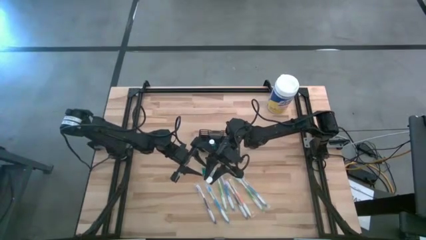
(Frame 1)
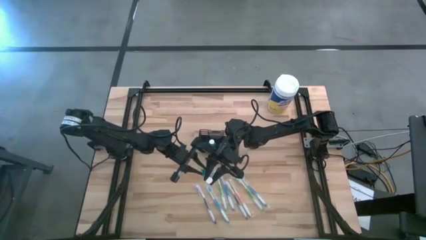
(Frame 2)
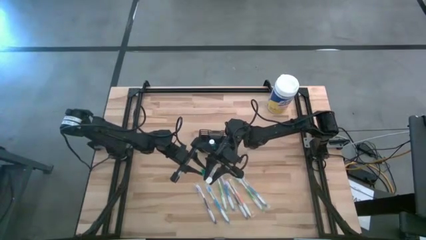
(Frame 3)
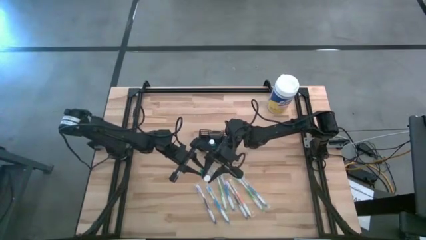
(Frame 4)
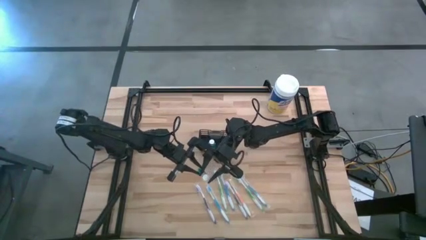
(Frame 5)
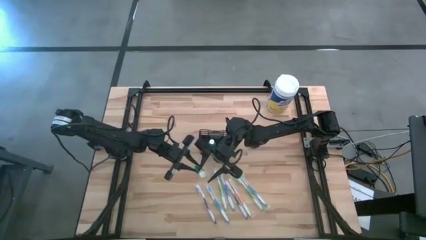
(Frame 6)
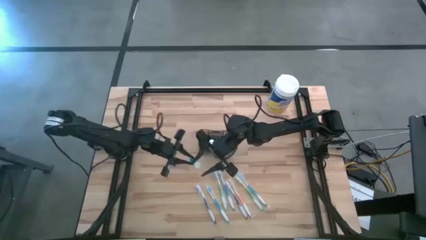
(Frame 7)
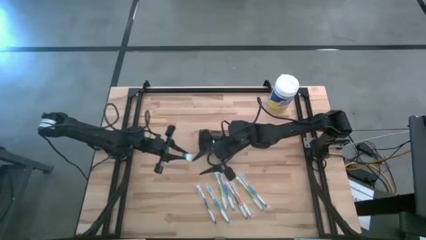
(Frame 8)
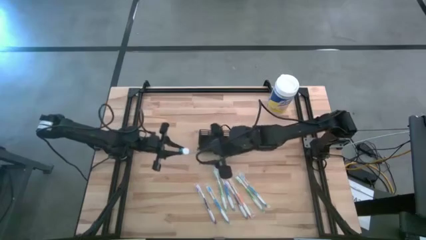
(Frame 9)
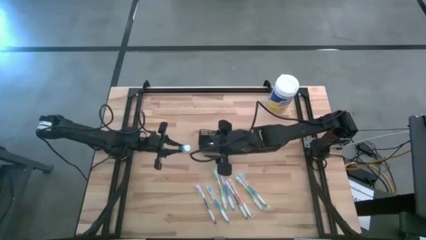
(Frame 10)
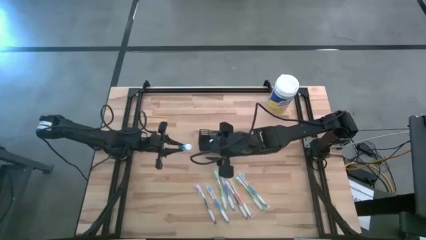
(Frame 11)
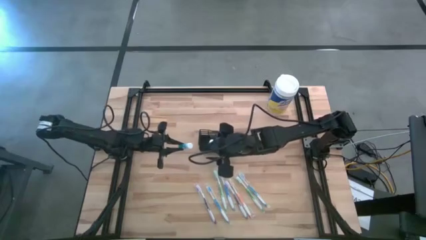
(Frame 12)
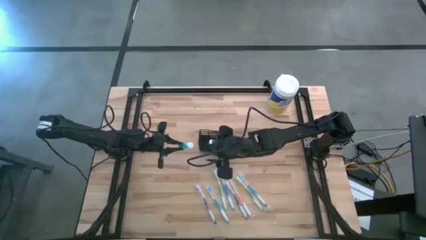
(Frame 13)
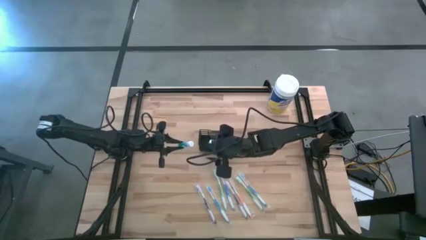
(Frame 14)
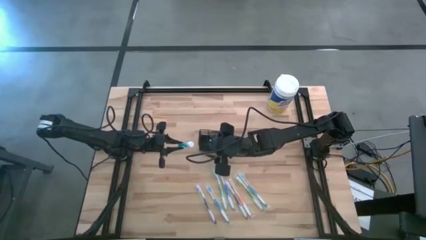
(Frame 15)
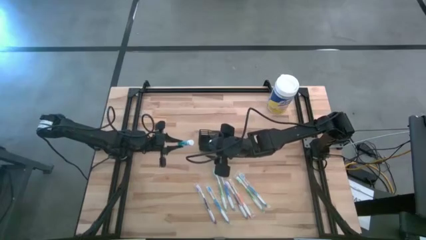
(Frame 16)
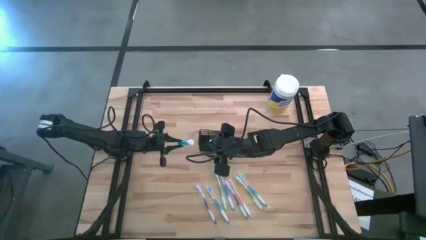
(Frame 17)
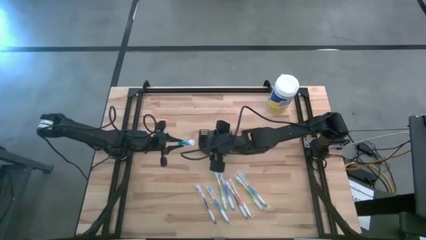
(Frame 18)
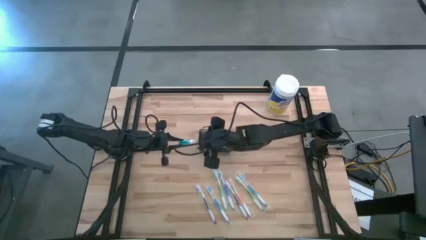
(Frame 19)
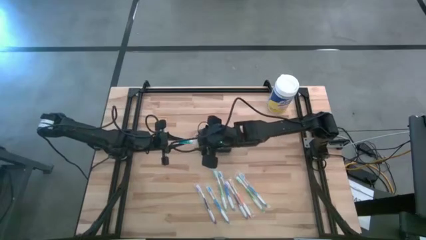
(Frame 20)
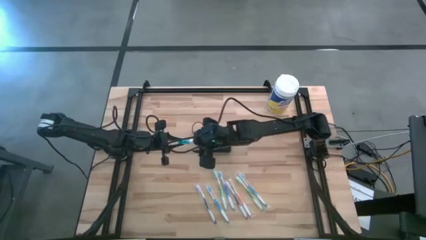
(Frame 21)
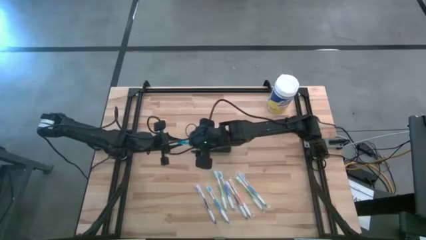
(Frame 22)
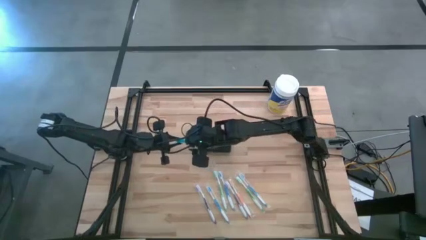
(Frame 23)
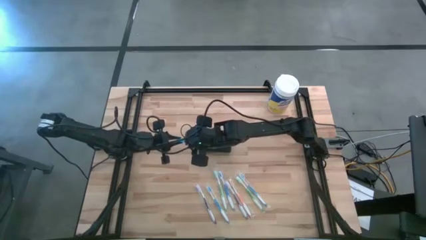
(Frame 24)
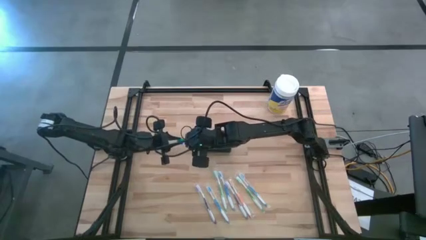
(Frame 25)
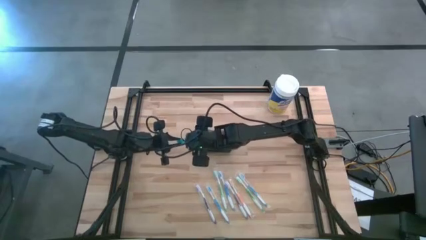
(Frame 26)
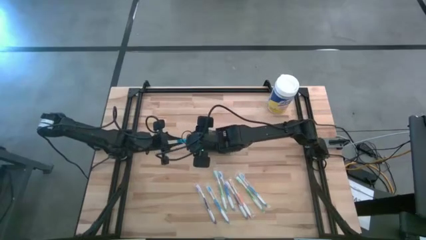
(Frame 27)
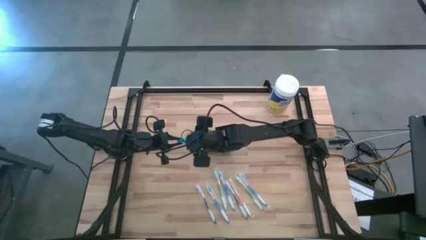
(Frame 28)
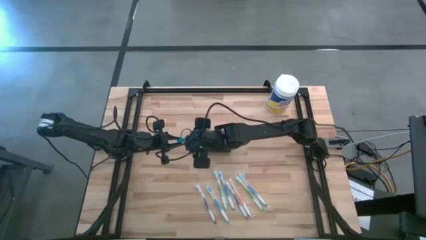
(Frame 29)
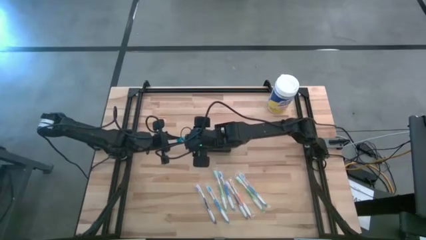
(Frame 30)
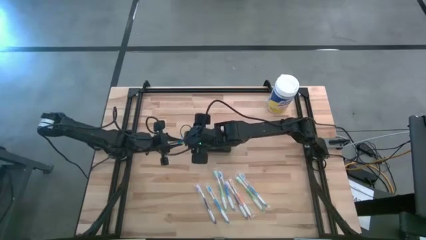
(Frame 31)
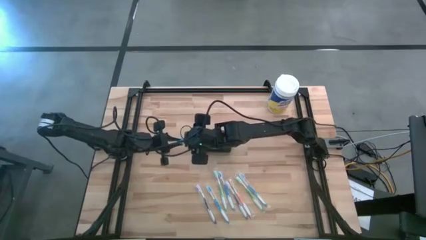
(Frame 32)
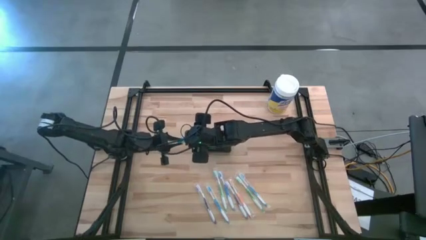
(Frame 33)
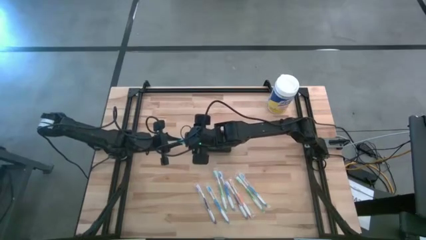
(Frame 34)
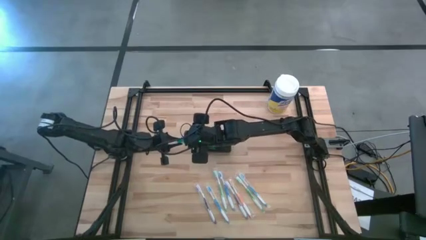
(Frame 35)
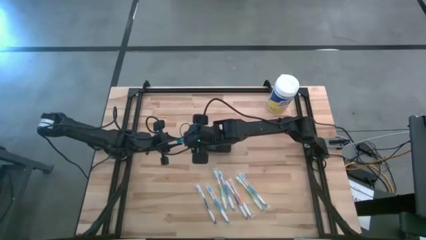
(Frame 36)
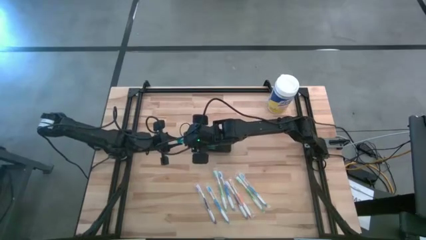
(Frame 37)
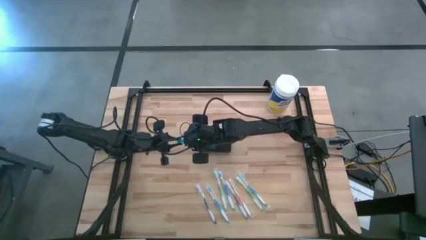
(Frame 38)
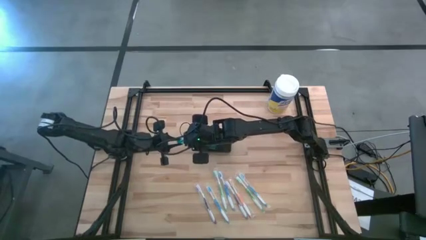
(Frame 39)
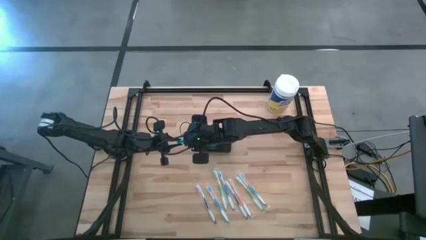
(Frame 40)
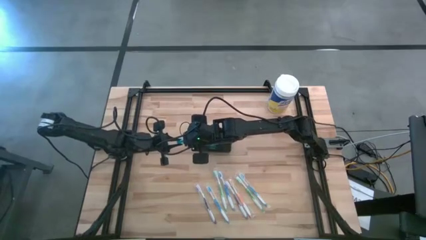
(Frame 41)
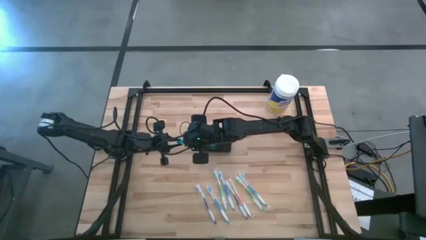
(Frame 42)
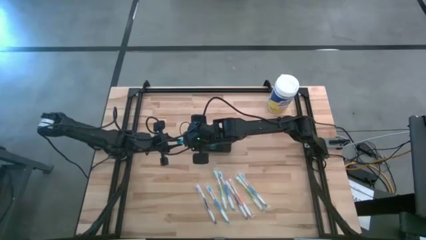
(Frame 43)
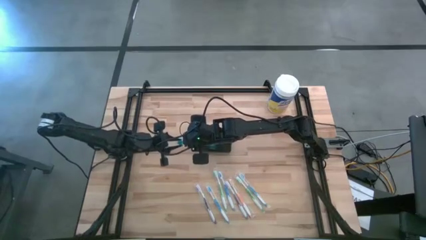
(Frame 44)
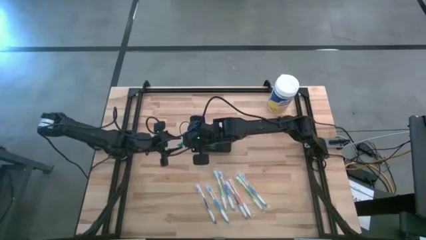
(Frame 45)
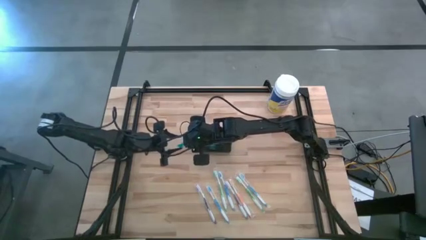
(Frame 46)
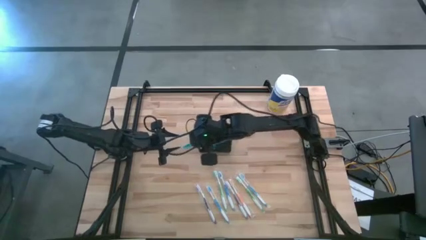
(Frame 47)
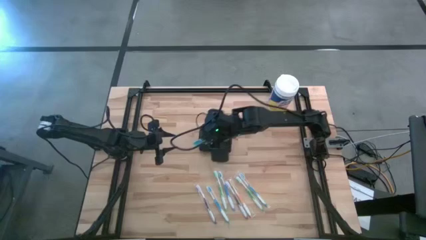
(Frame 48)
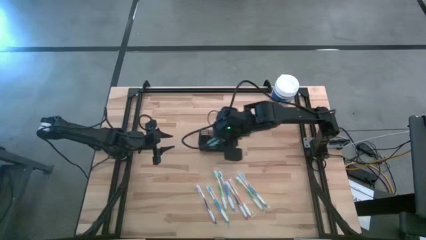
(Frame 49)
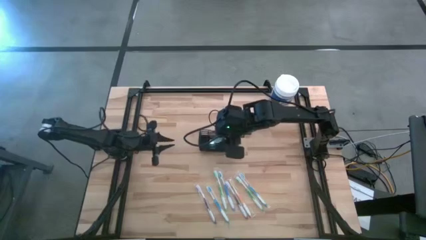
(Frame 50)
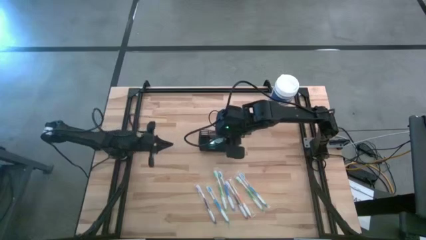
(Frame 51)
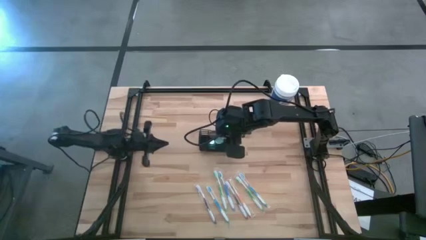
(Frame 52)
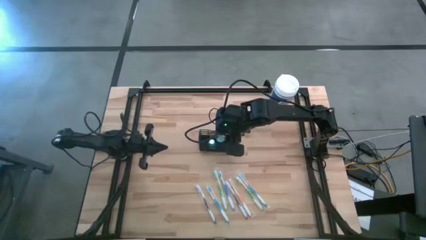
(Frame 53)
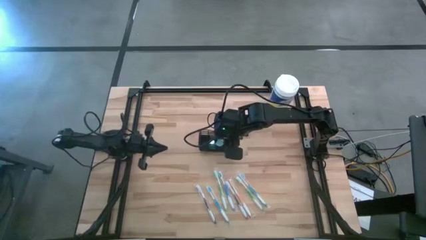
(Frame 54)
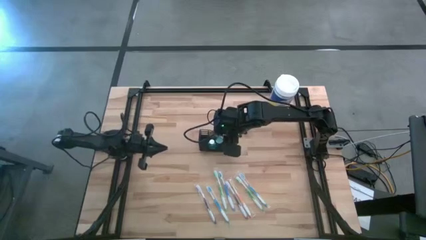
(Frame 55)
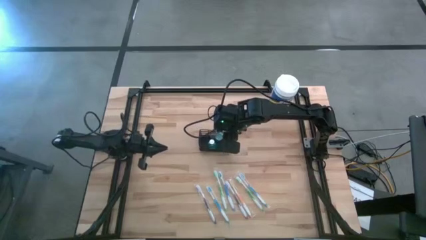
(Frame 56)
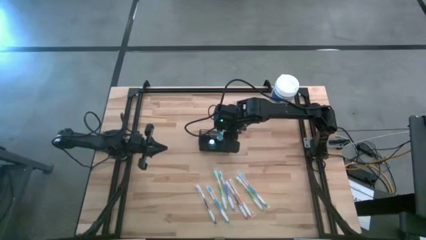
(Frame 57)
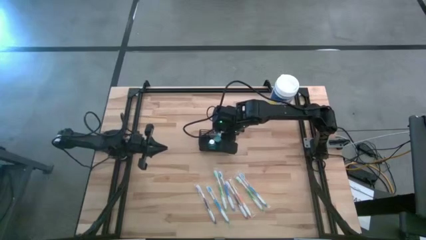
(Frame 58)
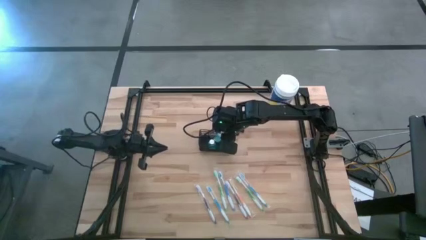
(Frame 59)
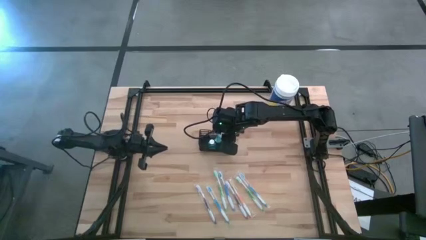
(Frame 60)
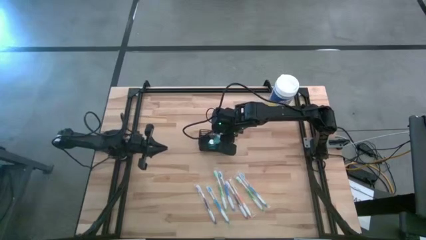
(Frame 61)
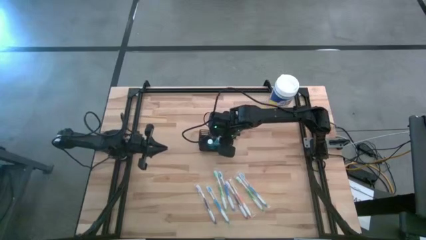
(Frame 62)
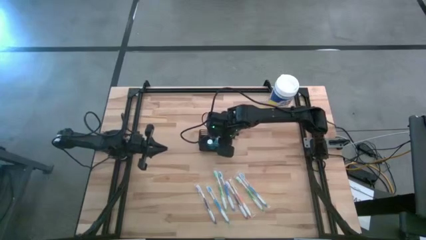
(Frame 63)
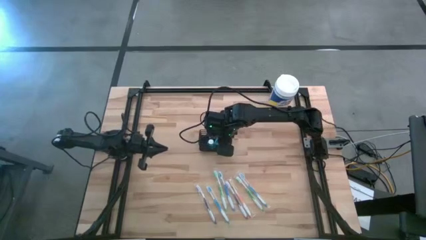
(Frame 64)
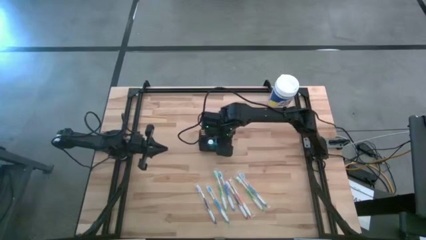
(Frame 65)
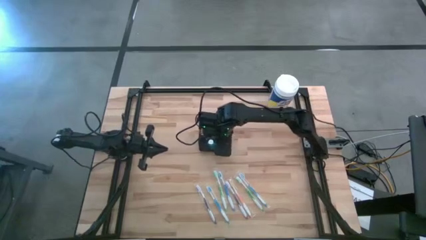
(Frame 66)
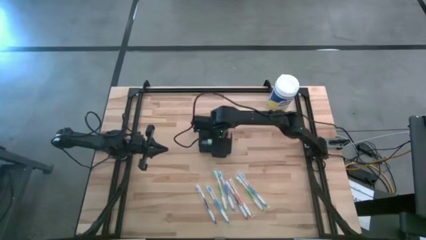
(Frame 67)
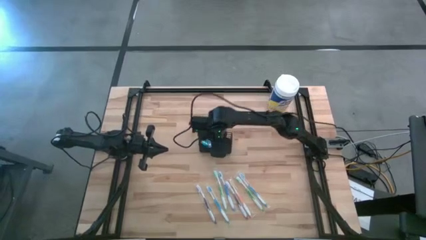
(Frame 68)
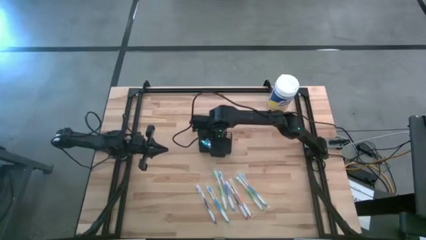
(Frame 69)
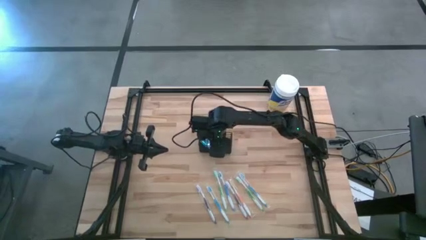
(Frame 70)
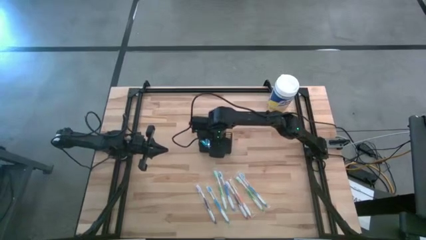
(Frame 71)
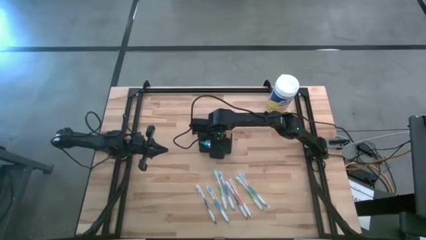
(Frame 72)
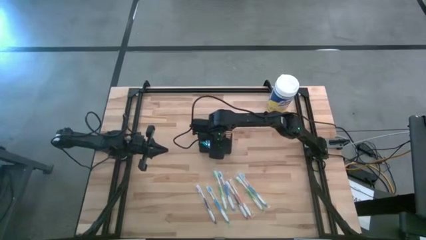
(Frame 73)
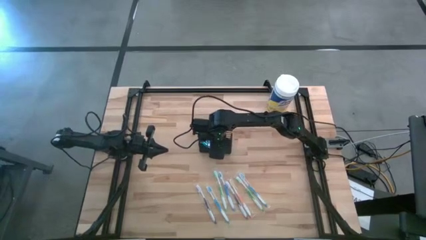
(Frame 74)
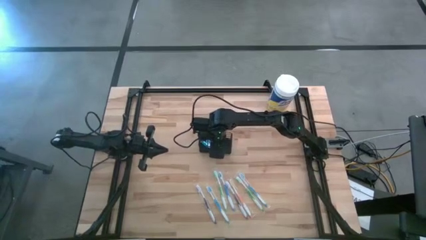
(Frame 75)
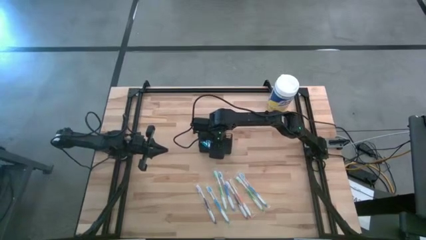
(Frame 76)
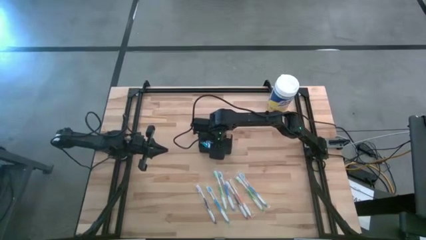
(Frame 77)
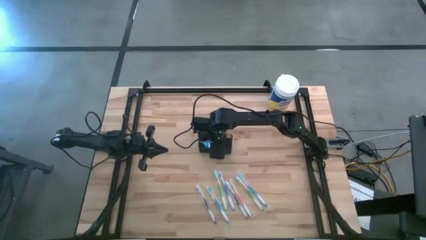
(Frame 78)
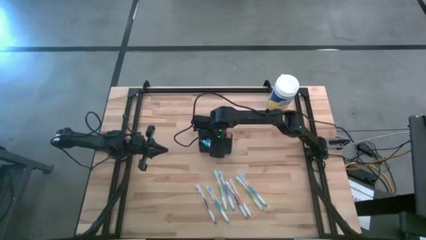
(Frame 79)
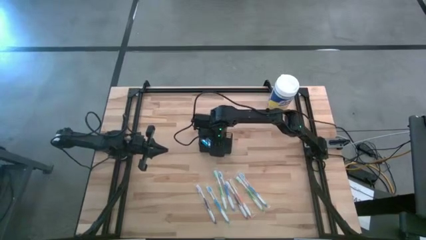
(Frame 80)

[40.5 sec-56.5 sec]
Task: Pick & Place toothbrushing station
Put the blue mouthwash bottle into the black wire organizer

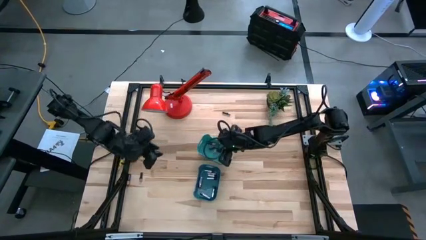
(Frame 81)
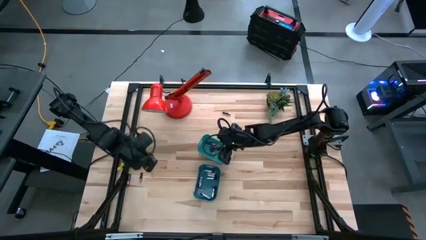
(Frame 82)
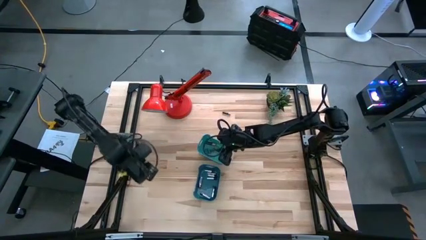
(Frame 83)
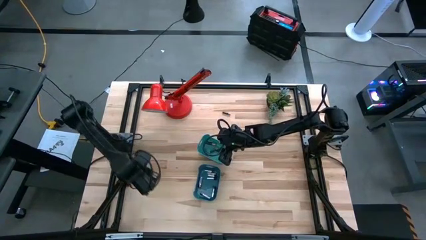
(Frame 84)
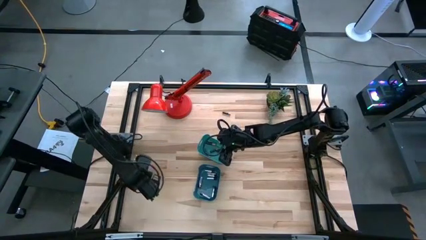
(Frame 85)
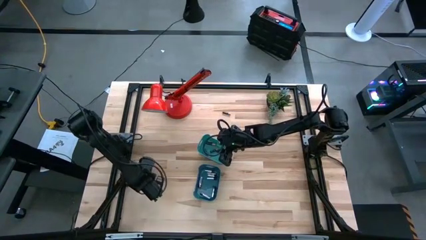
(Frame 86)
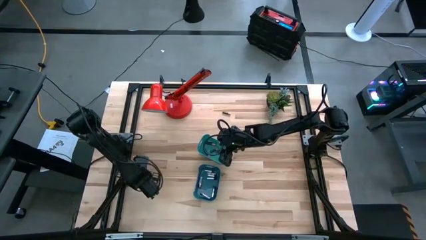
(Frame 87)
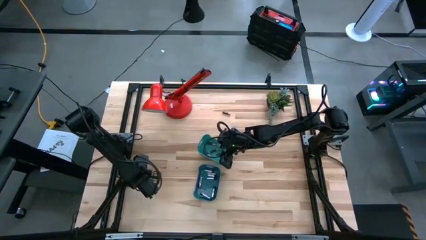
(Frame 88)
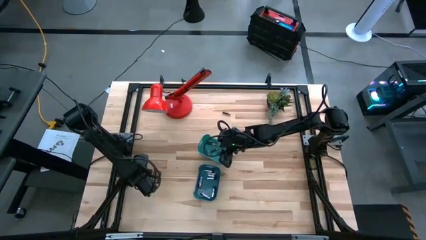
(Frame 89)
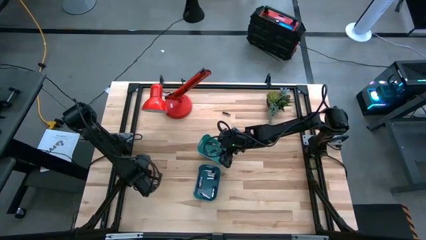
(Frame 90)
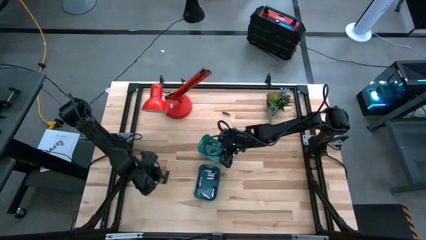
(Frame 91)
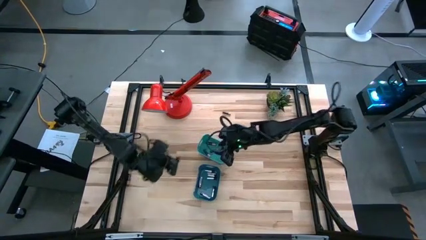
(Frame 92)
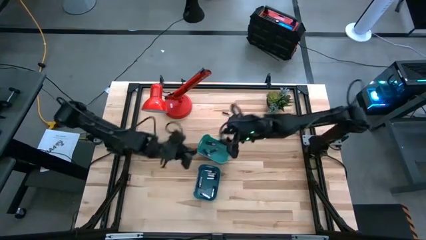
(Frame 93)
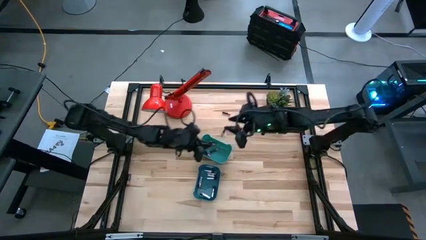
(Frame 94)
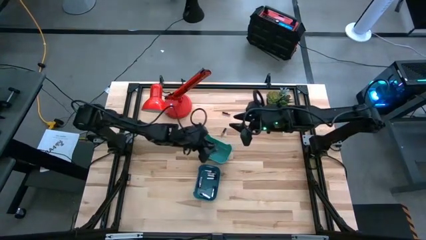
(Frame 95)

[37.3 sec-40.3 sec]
Task: Sort batteries
Put the black battery into the light blue bin
